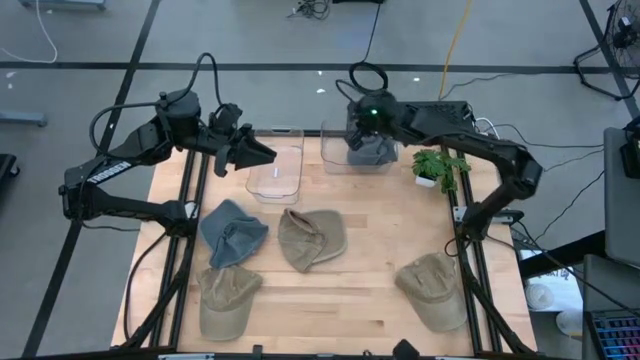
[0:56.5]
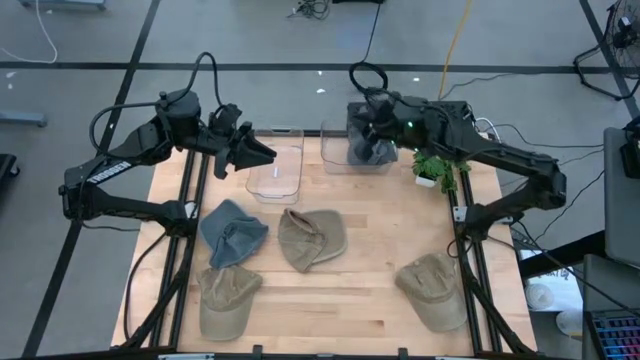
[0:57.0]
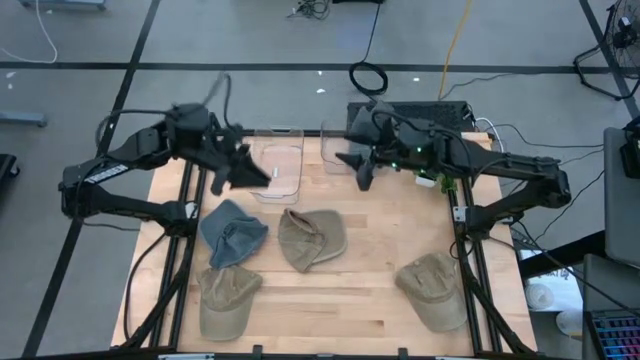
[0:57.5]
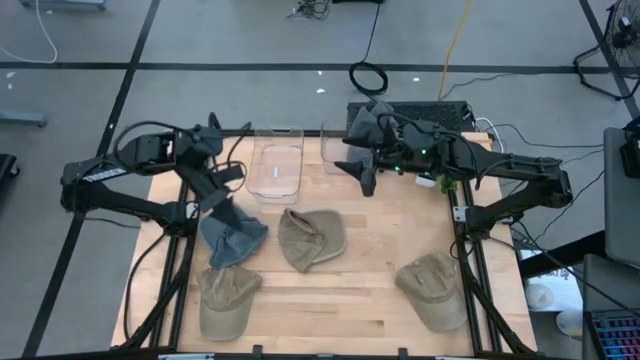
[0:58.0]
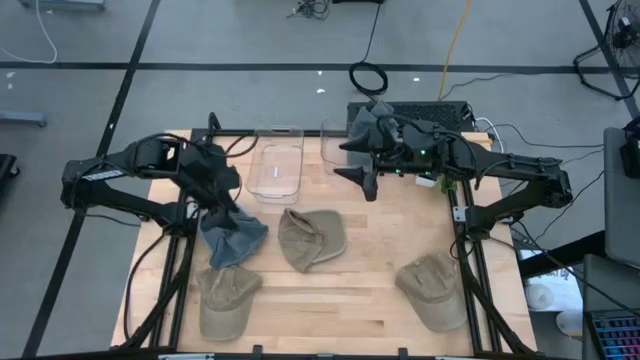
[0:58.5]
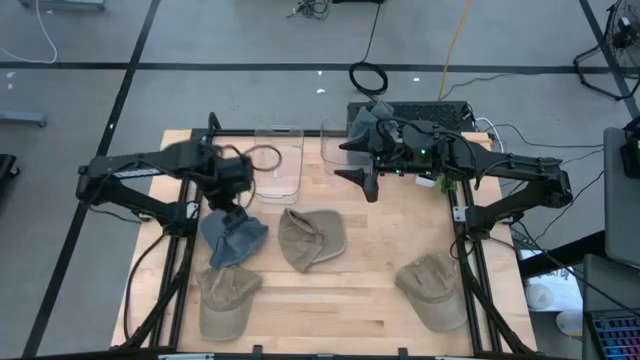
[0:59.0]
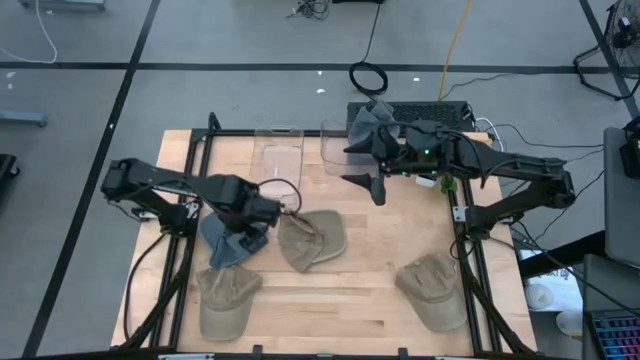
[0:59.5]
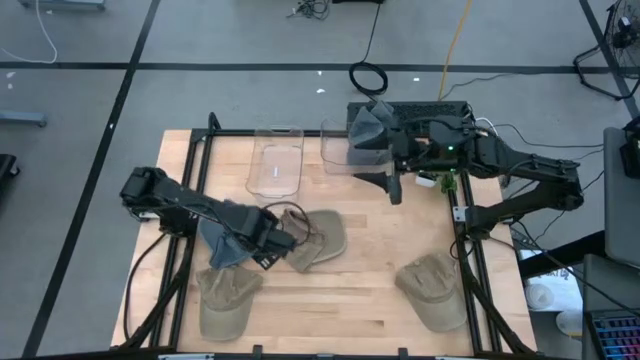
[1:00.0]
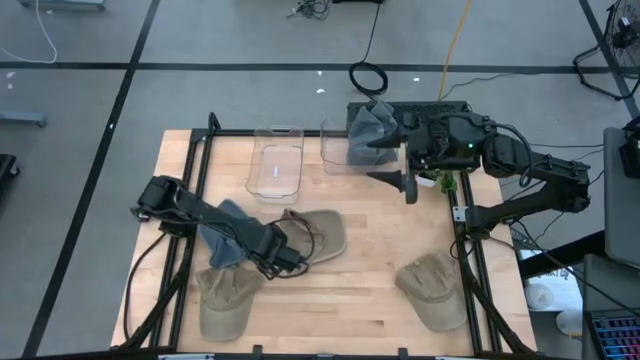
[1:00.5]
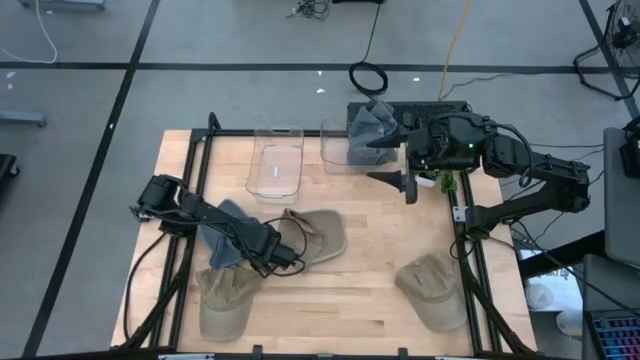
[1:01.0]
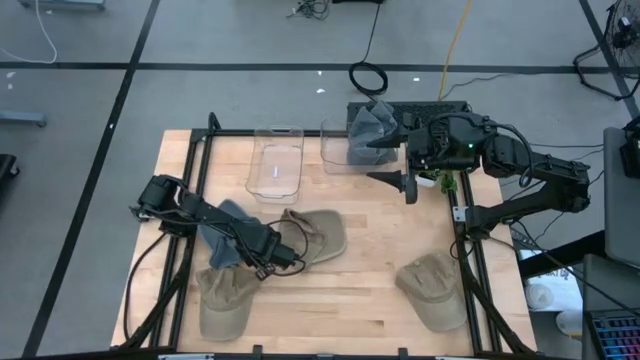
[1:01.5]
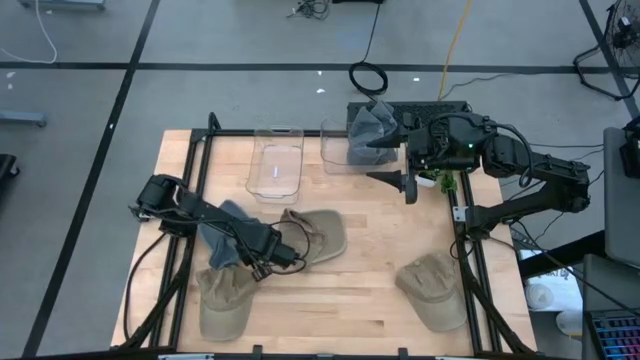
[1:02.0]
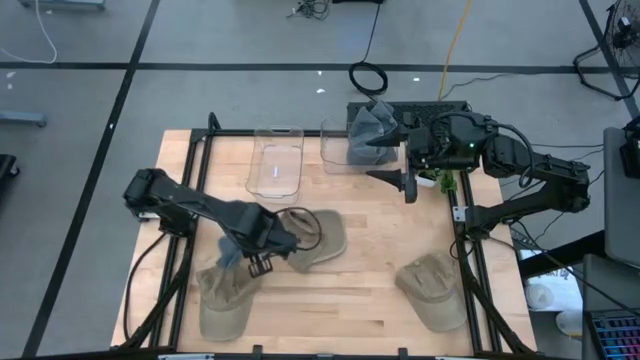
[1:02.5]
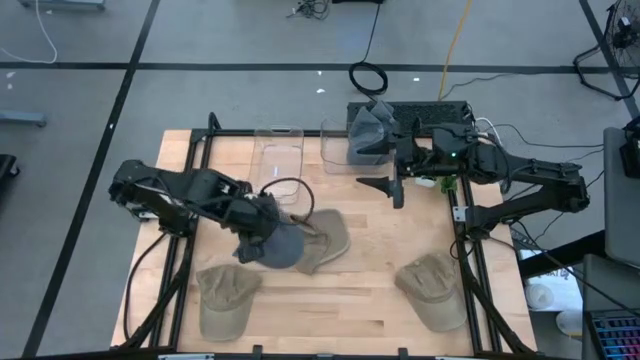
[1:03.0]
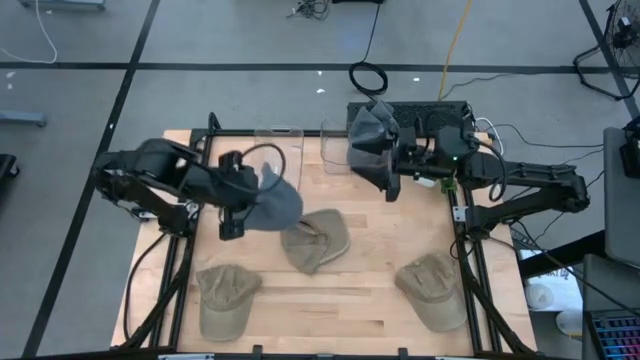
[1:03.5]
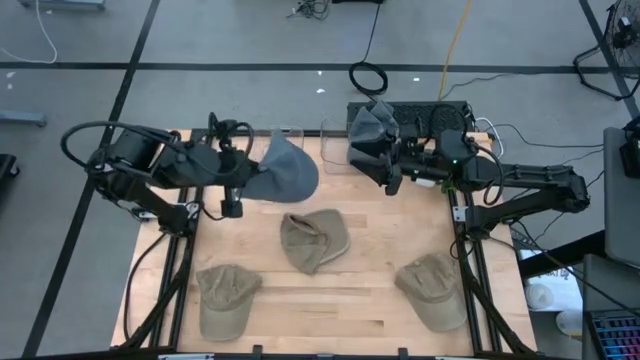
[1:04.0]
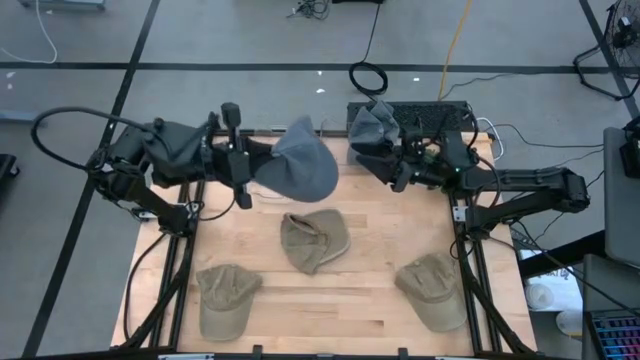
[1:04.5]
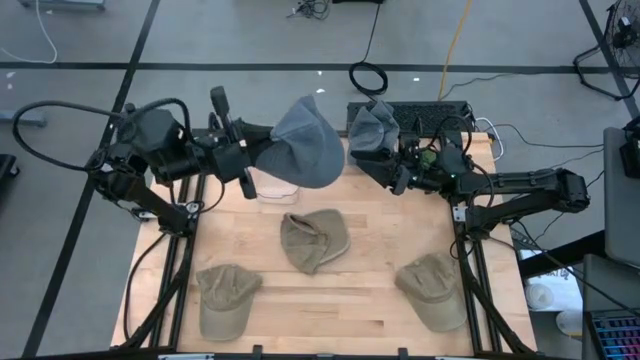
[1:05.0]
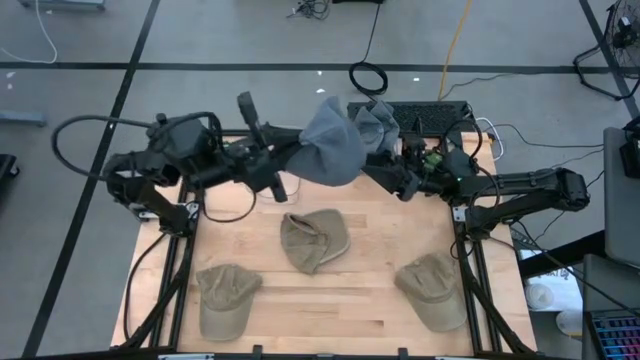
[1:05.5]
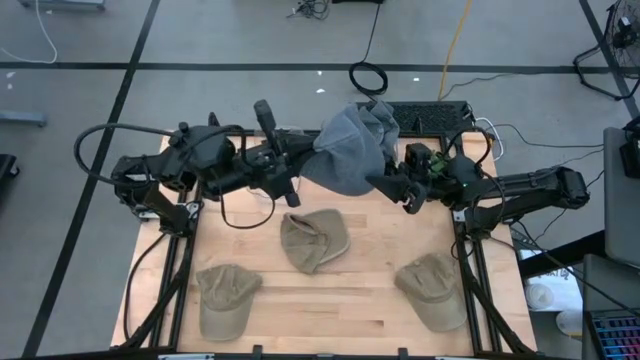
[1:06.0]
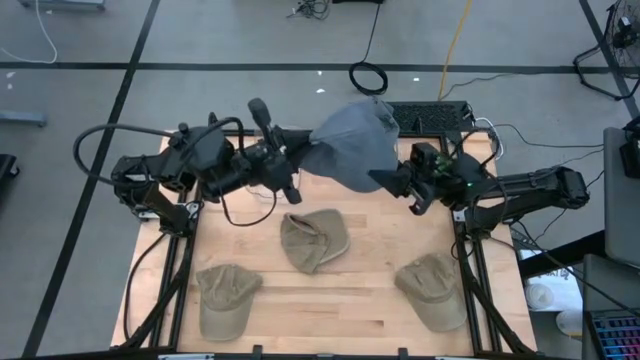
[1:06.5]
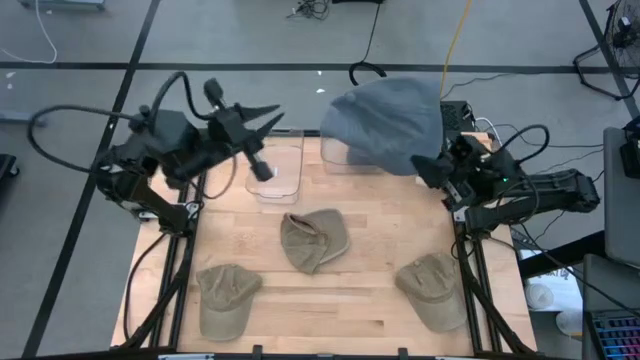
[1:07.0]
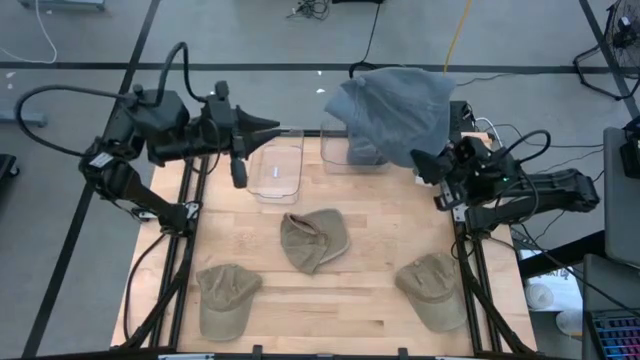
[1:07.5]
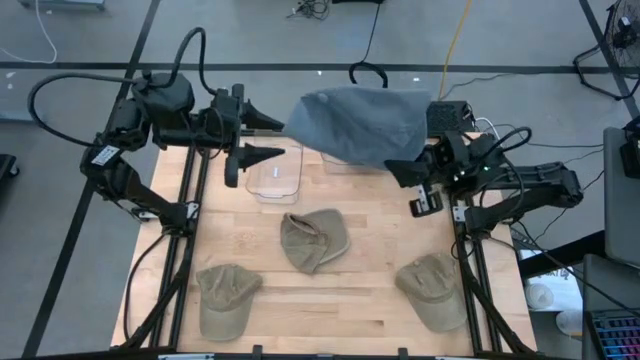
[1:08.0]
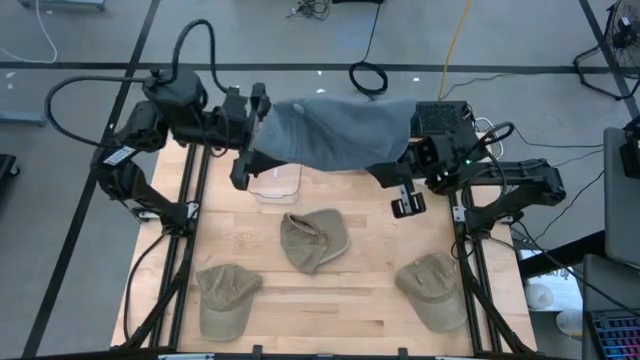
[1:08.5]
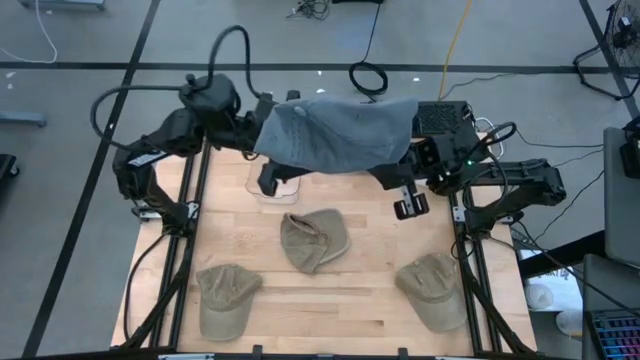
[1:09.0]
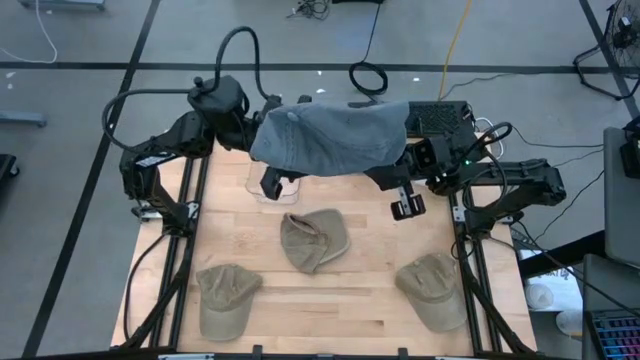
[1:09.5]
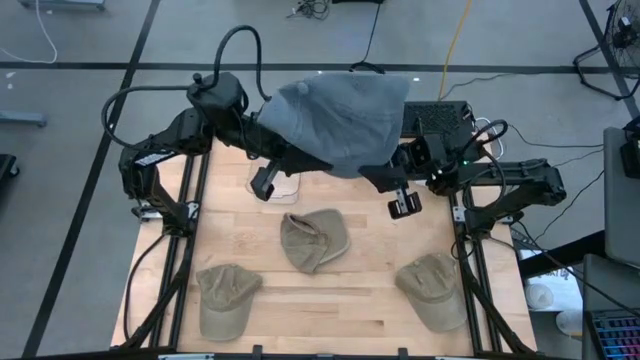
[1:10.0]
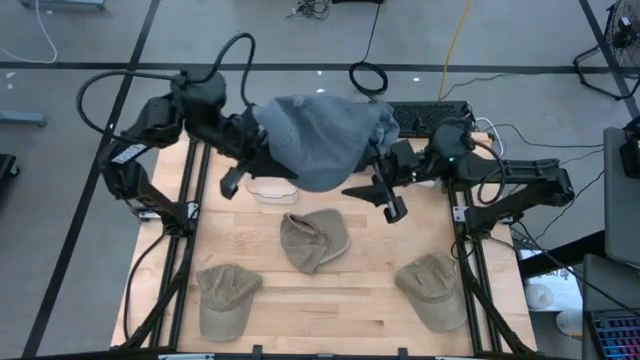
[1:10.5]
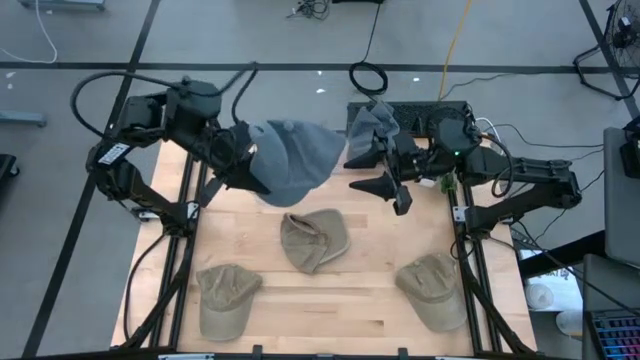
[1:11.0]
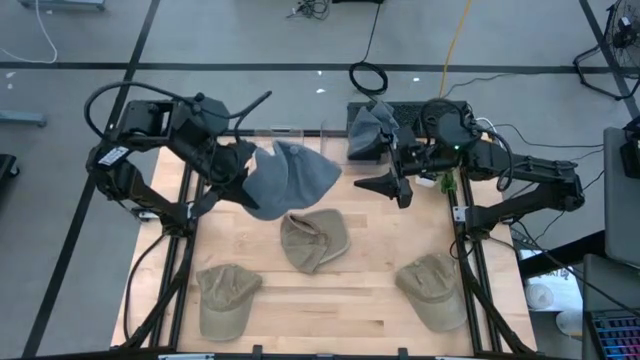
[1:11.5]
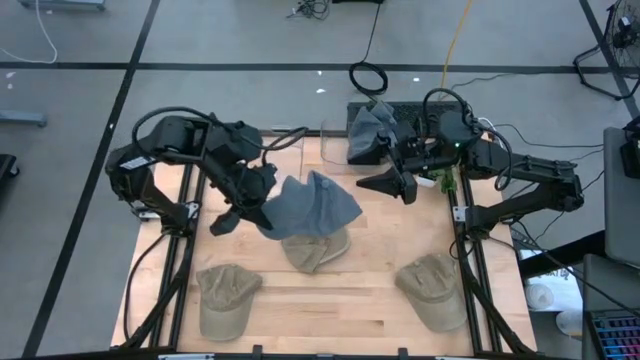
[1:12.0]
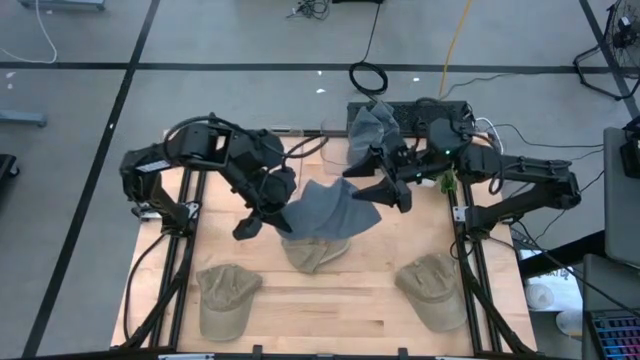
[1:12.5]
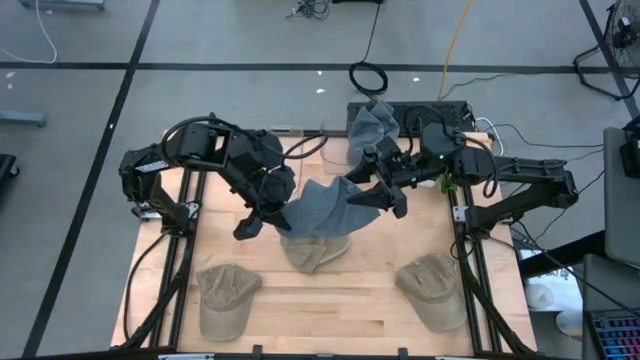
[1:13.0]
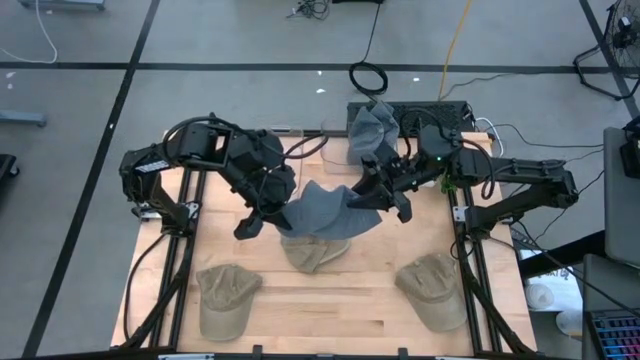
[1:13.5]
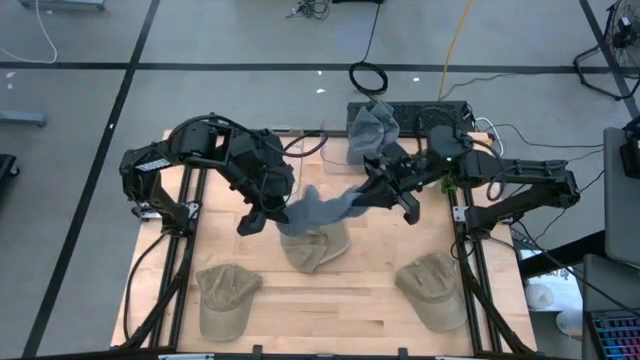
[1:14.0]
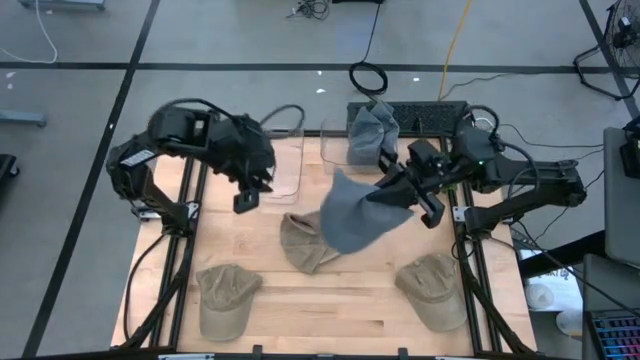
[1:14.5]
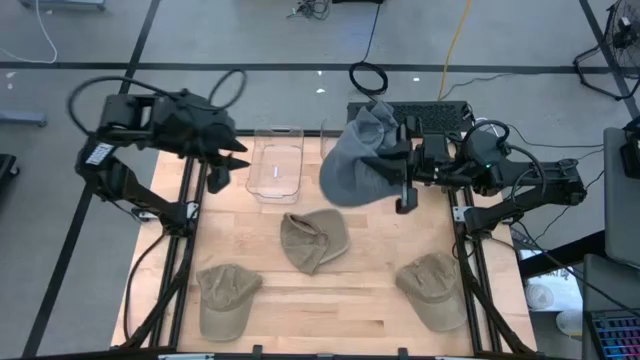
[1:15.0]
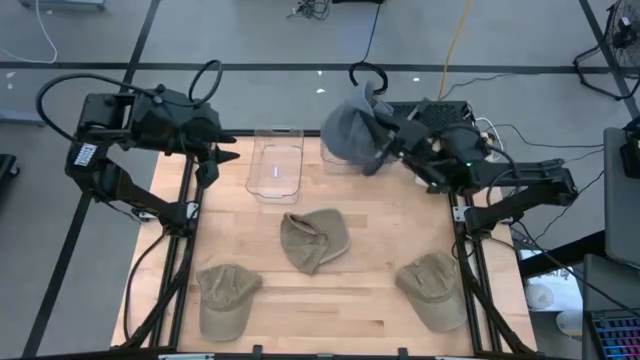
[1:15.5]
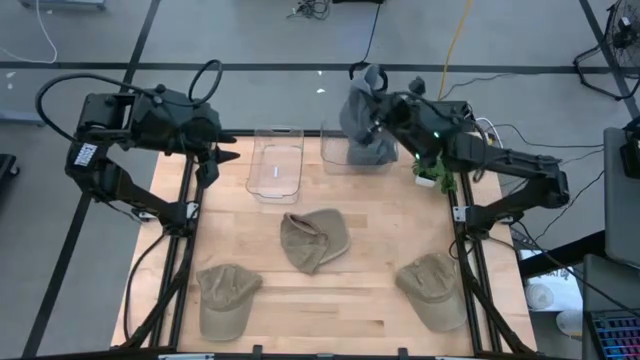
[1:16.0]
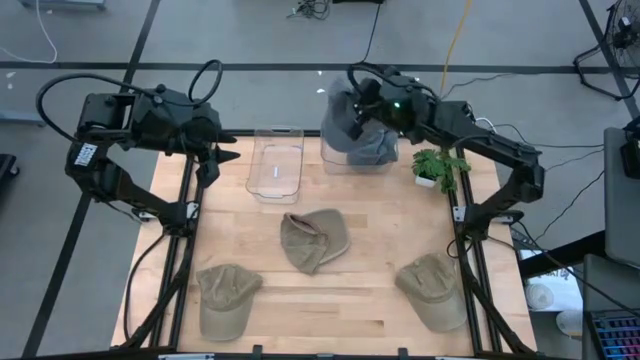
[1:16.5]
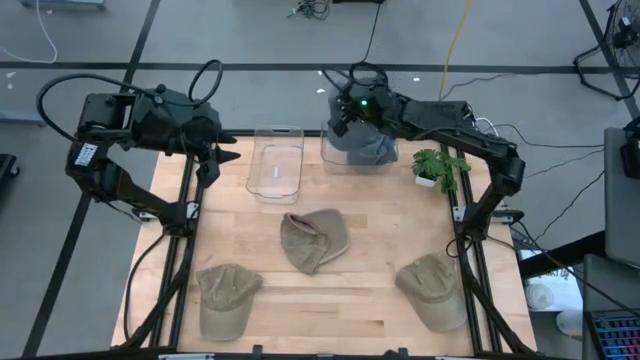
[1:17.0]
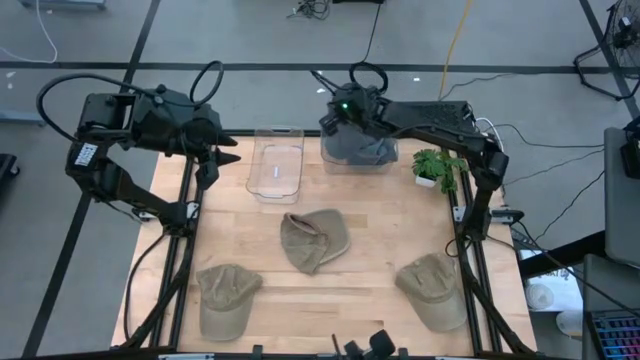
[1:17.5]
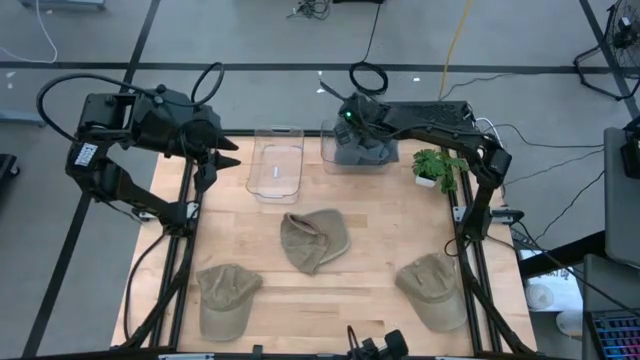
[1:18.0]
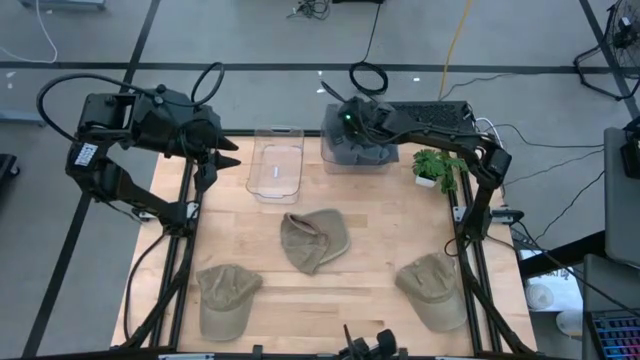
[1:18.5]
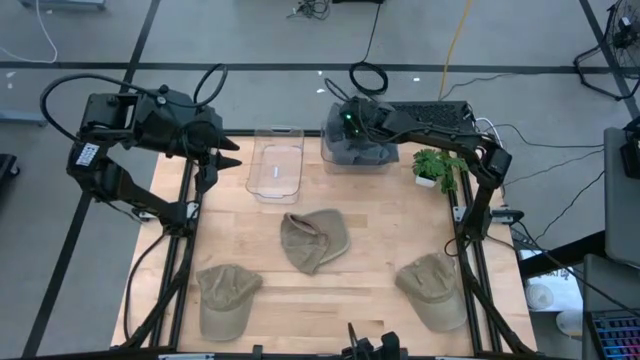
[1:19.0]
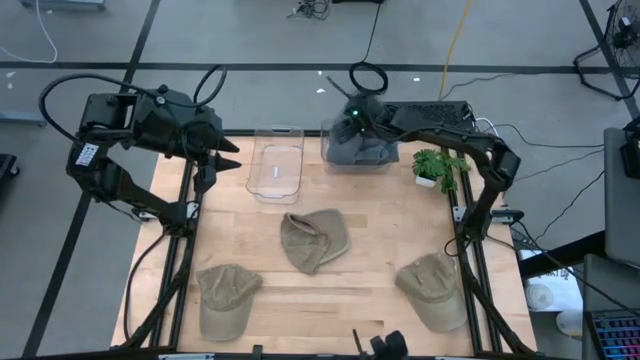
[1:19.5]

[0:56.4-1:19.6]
Task: Pick & Place hat
Put the blue cap into the right transparent bin
